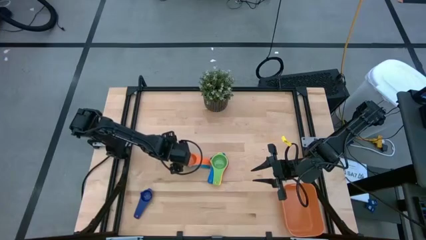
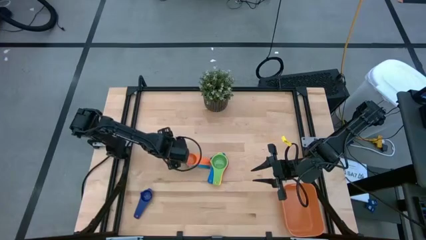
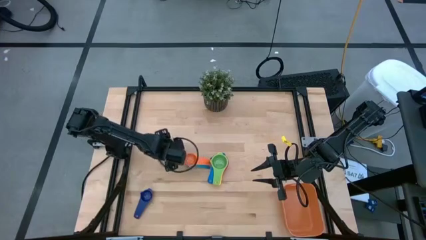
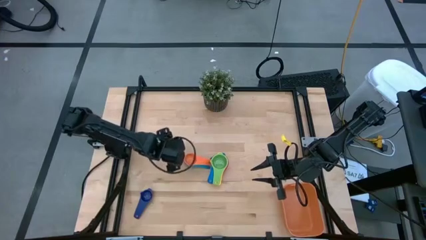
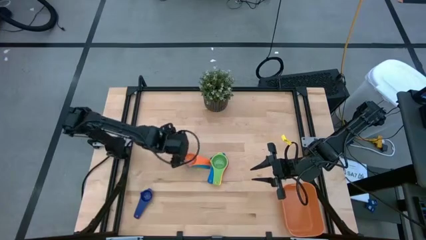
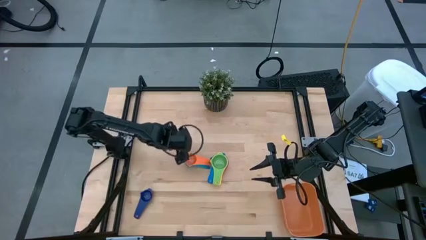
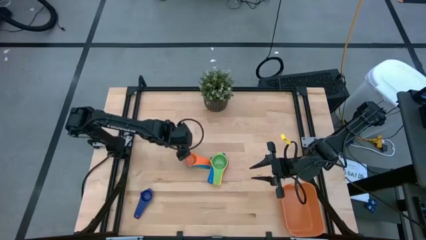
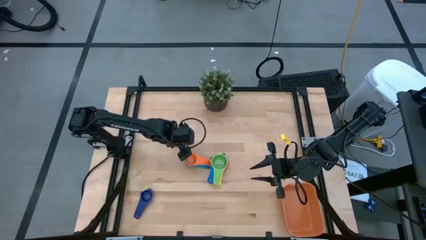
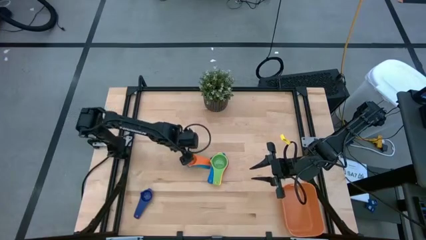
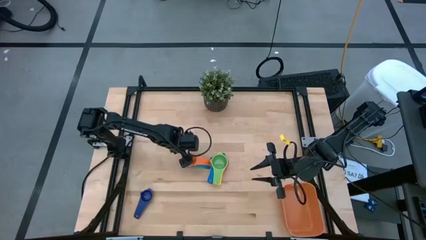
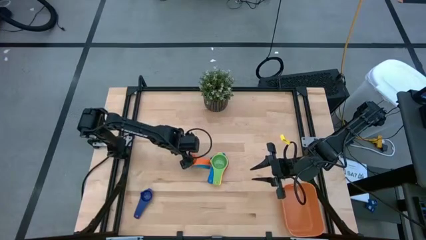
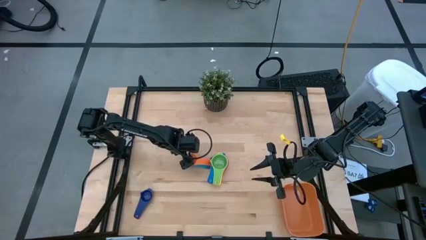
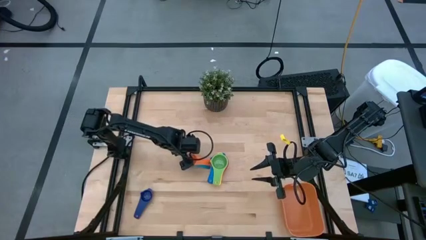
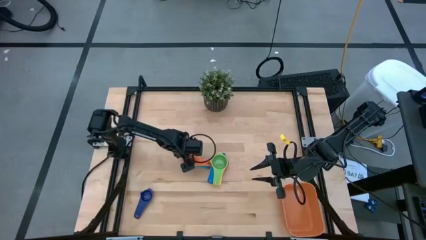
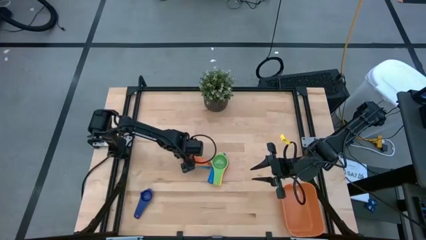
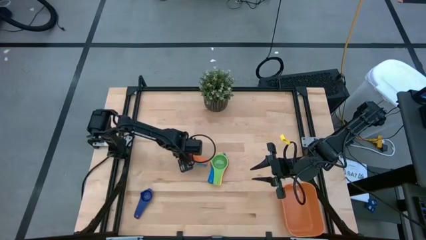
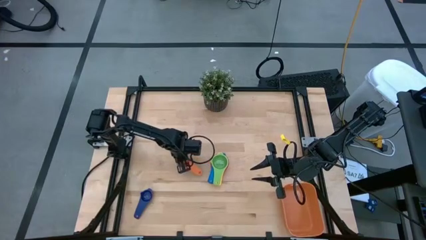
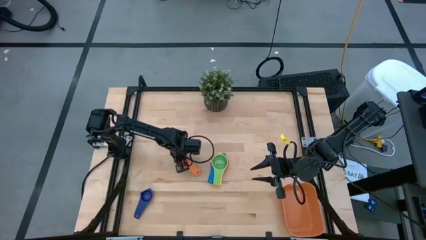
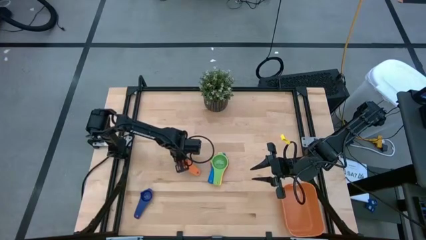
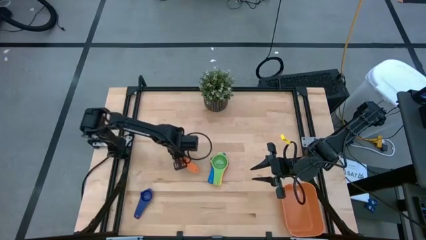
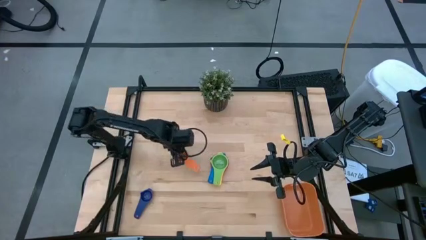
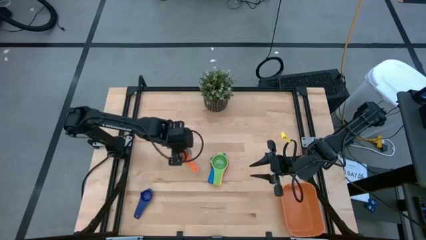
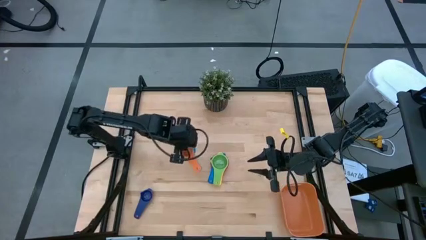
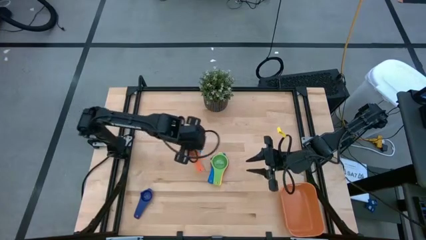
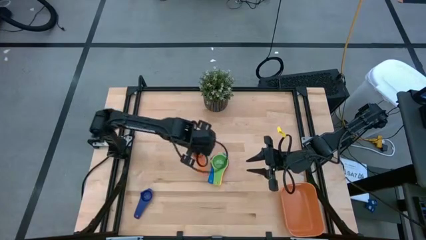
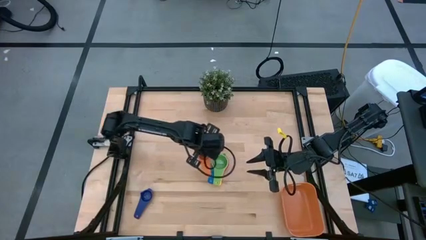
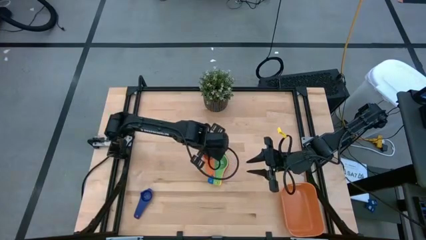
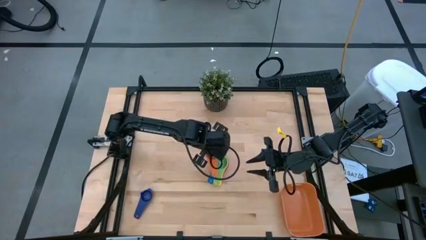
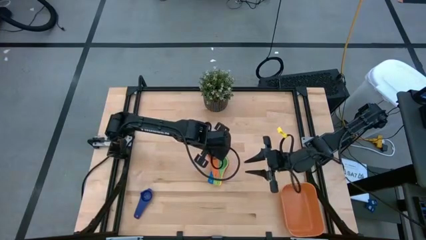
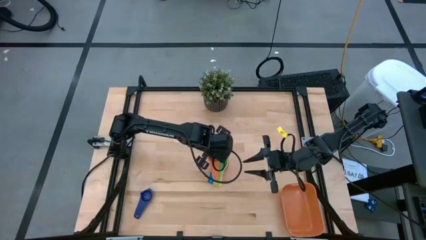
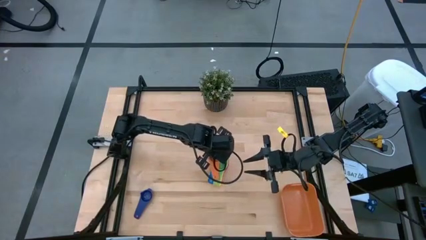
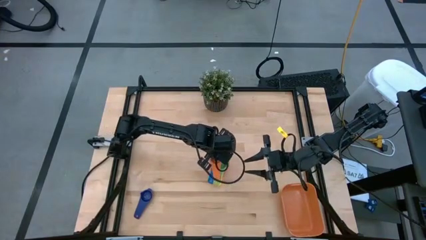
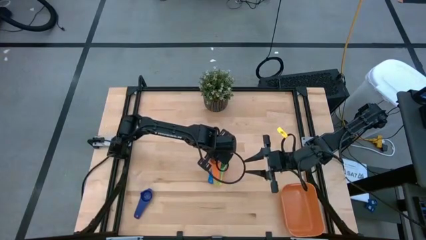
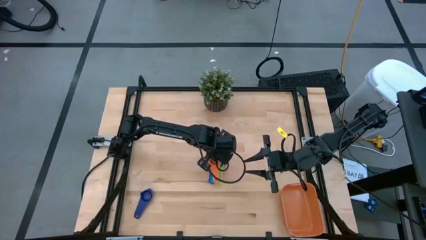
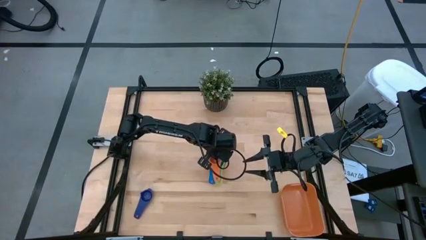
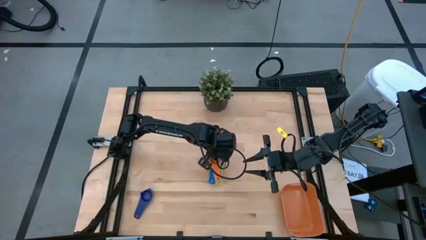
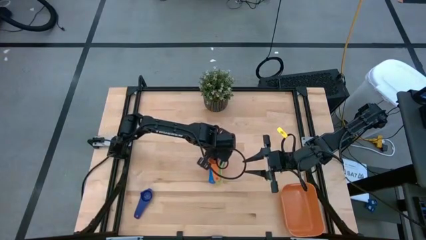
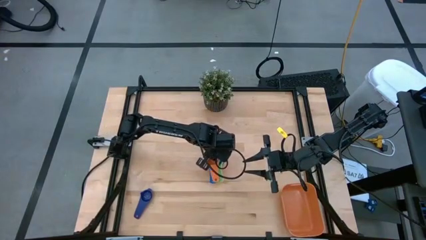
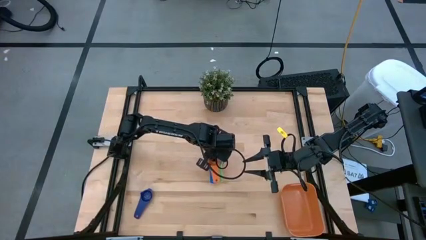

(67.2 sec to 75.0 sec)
Task: Nest measuring cups in basket
Stack the nested light blue and orange measuring cups on top of the green measuring cup

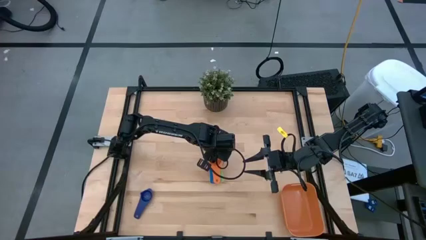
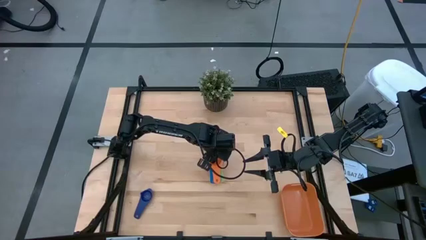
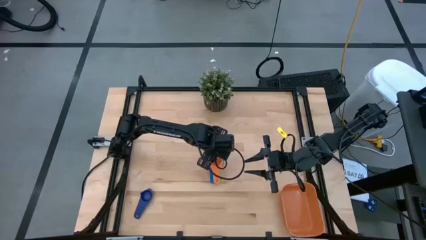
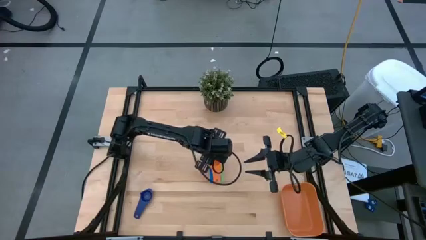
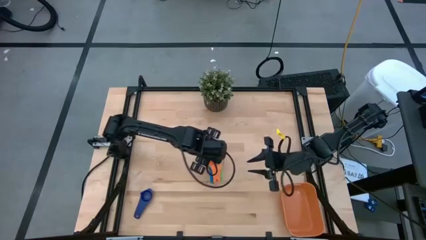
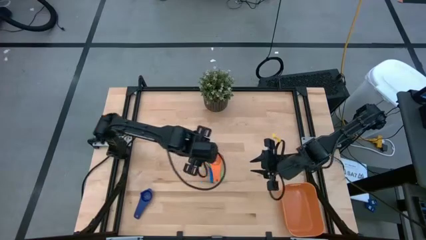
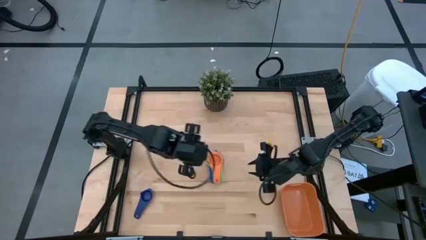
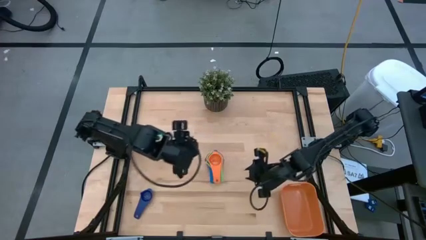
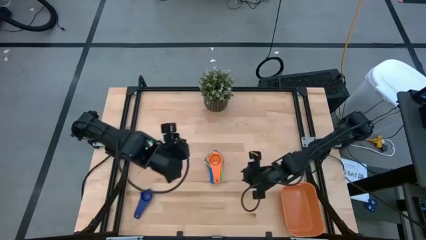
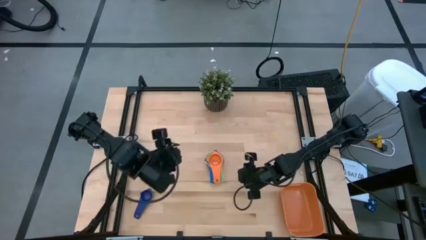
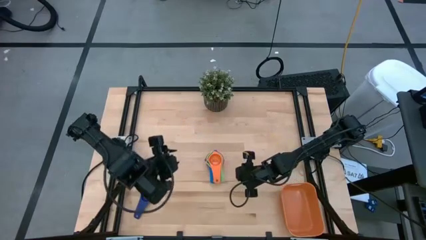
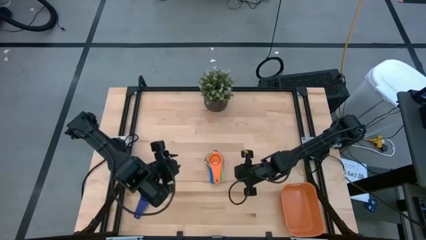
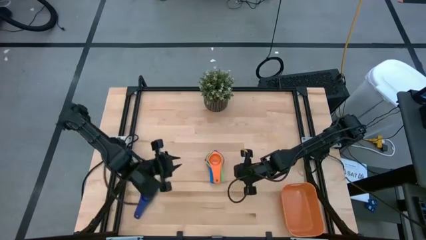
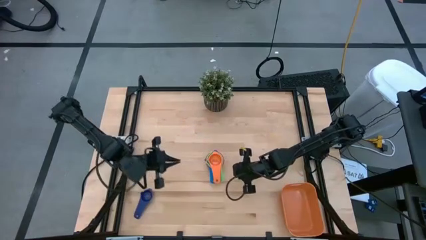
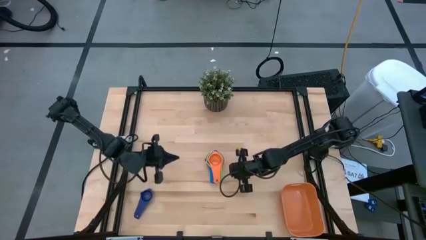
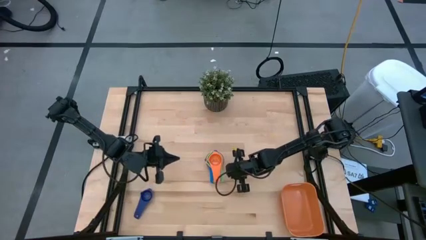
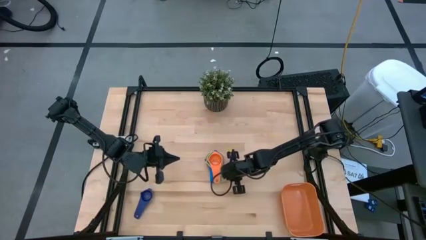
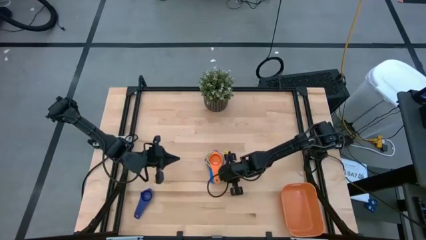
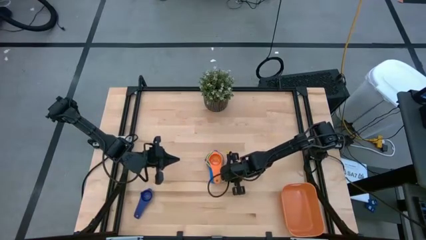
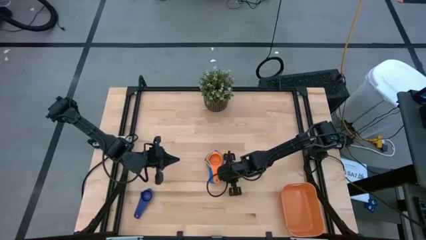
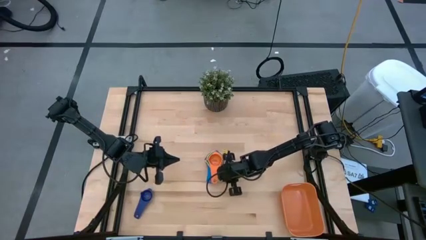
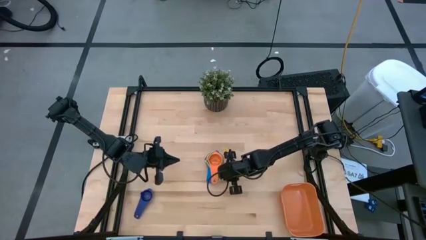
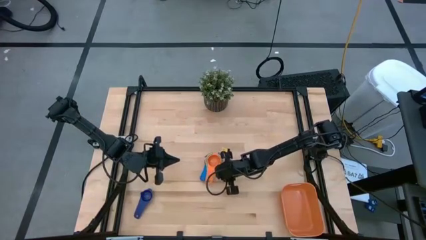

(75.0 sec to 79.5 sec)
Adjust the nested measuring cups

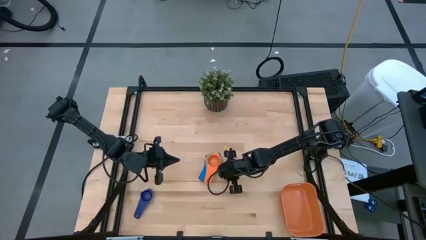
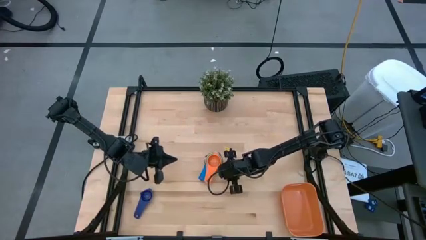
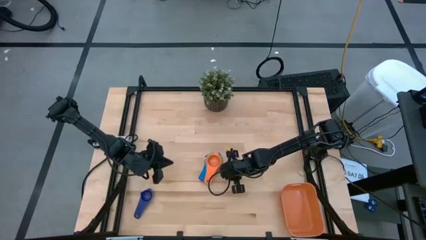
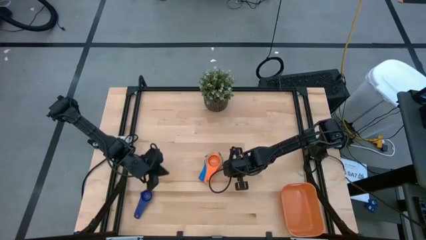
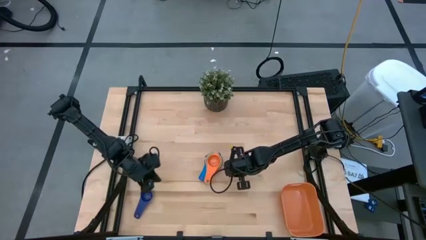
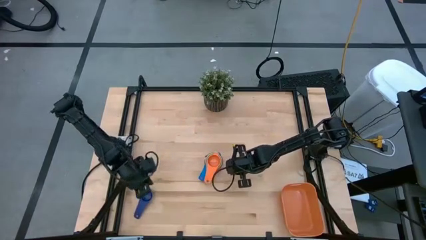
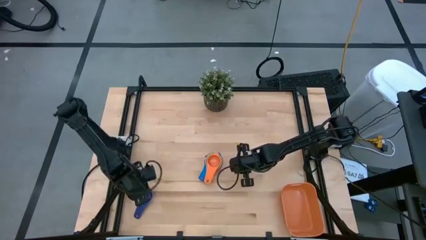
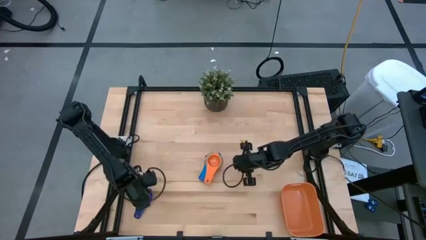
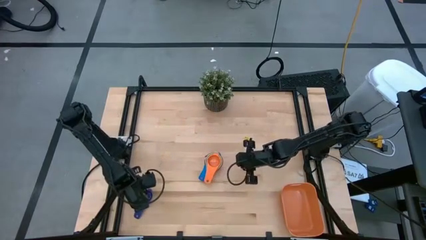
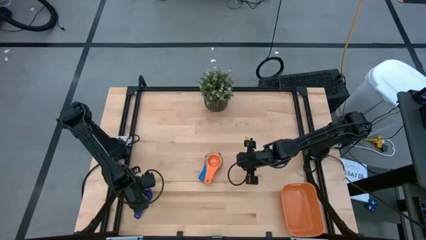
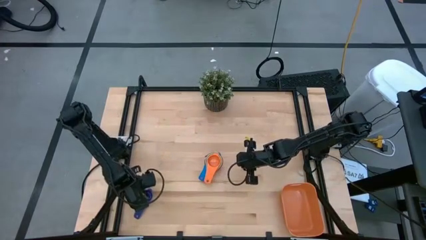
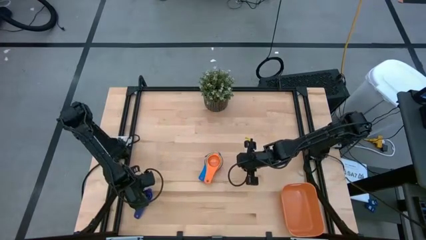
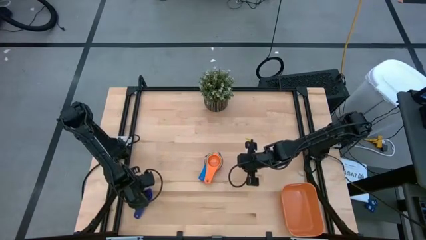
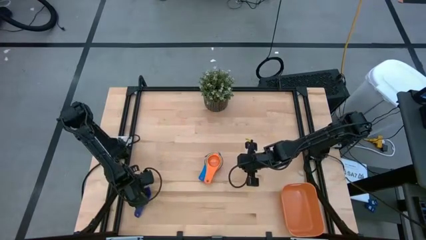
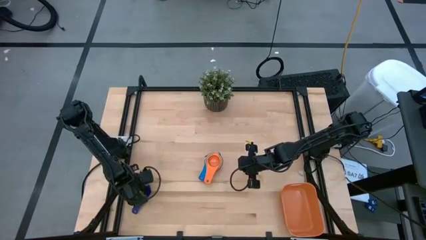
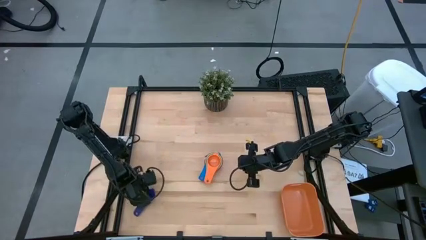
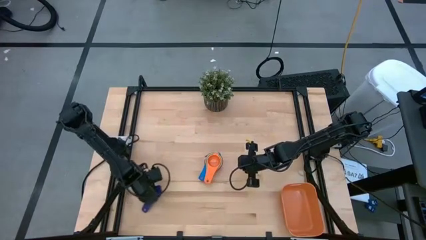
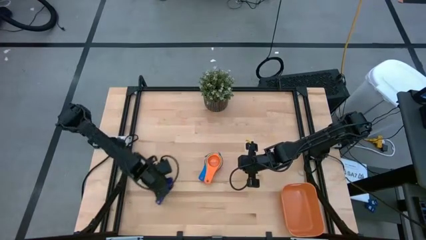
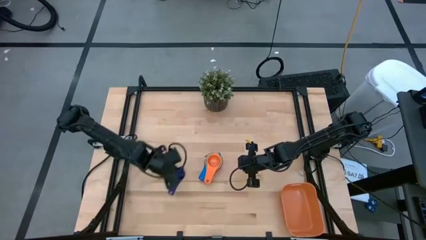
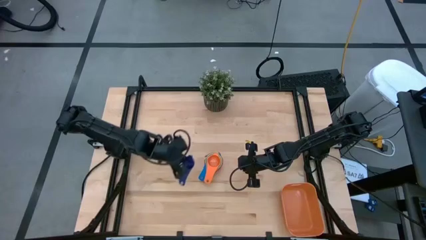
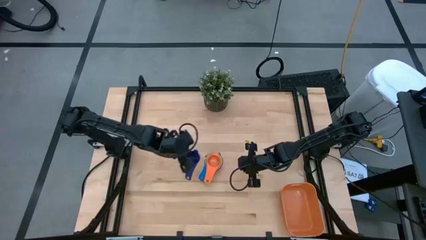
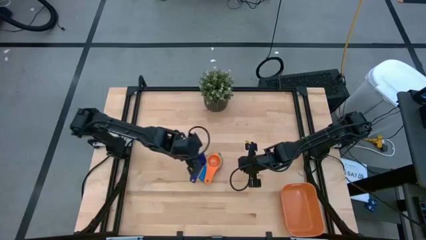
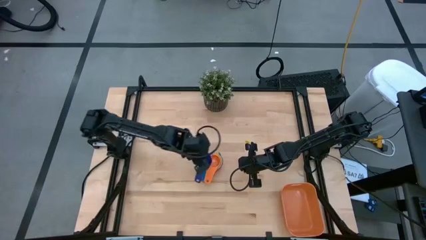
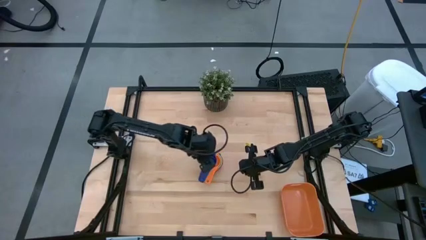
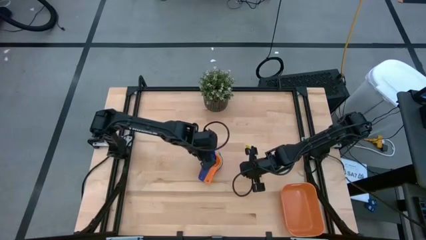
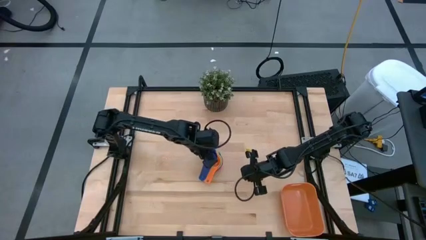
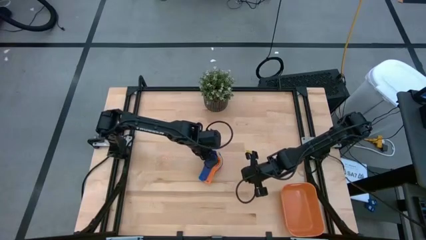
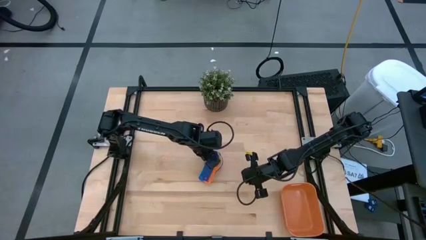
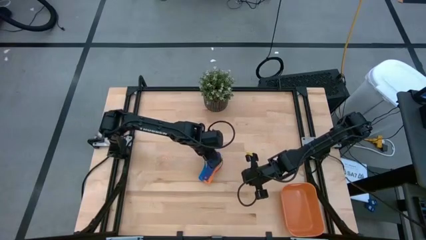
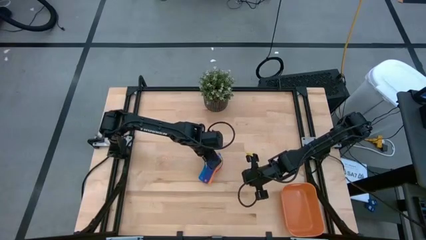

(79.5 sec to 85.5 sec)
Stack the dark blue measuring cup on top of the orange measuring cup
